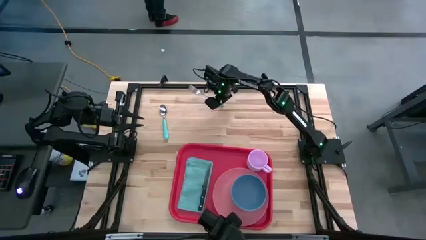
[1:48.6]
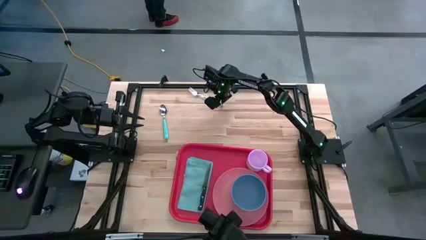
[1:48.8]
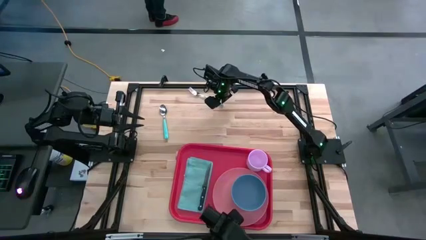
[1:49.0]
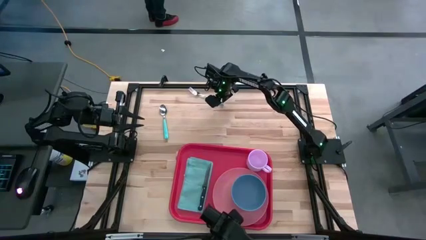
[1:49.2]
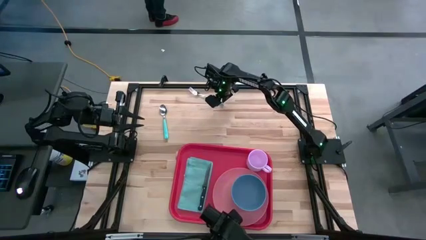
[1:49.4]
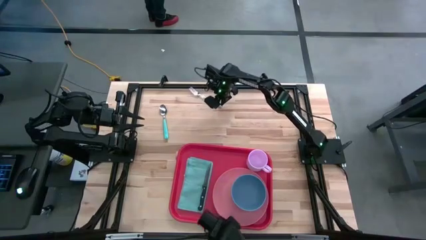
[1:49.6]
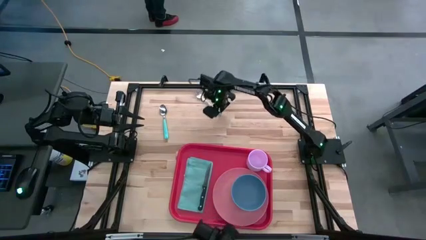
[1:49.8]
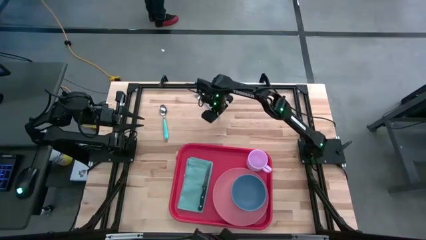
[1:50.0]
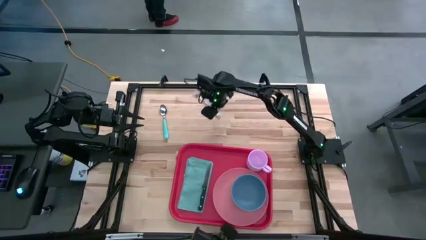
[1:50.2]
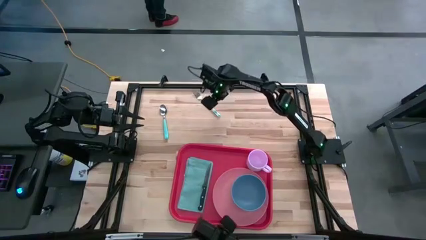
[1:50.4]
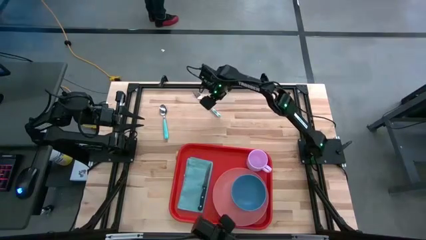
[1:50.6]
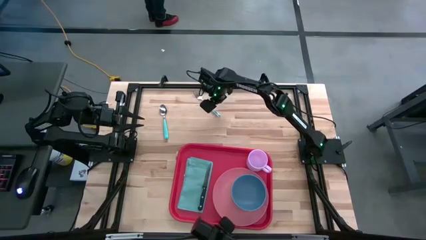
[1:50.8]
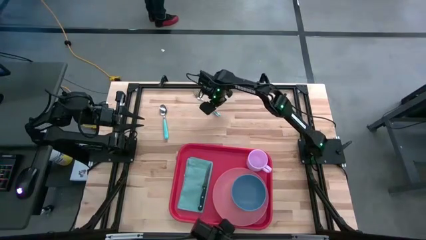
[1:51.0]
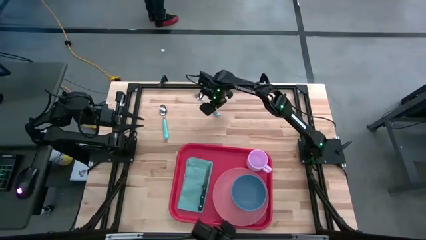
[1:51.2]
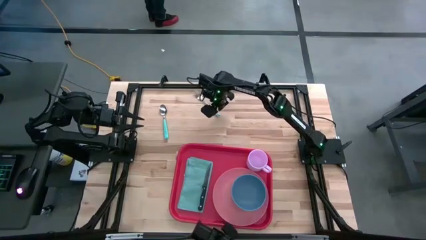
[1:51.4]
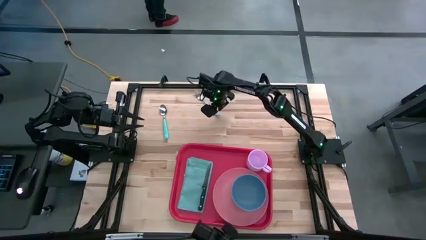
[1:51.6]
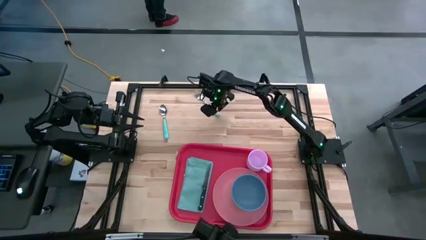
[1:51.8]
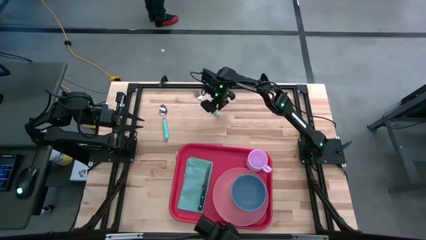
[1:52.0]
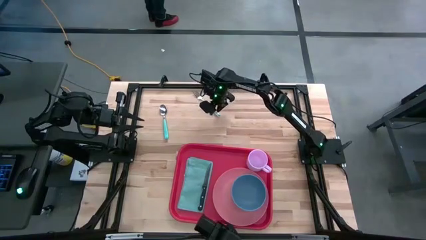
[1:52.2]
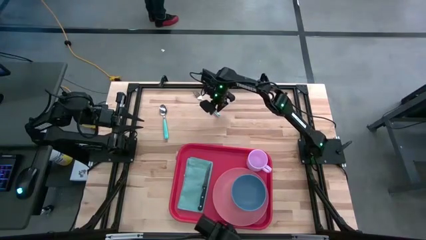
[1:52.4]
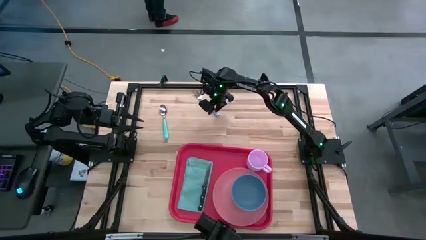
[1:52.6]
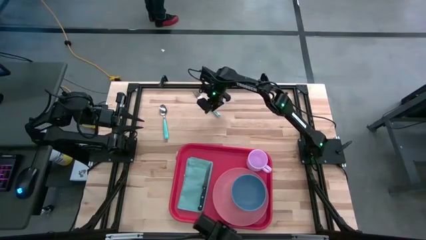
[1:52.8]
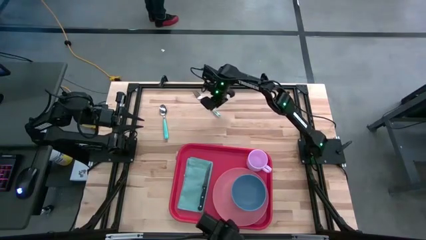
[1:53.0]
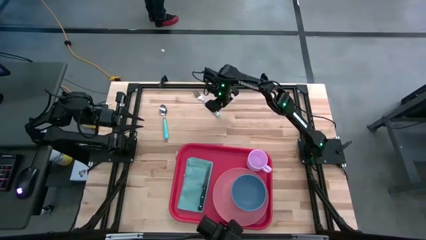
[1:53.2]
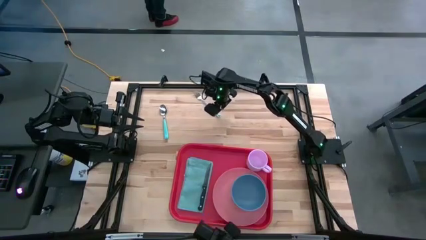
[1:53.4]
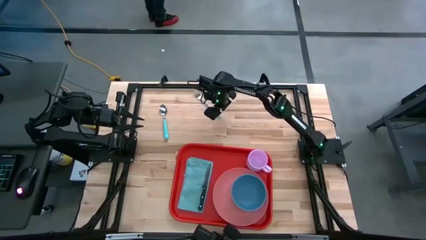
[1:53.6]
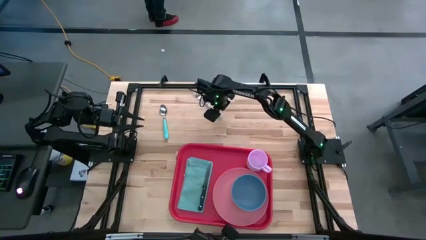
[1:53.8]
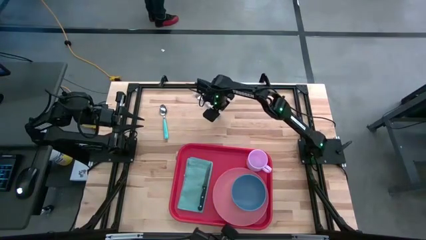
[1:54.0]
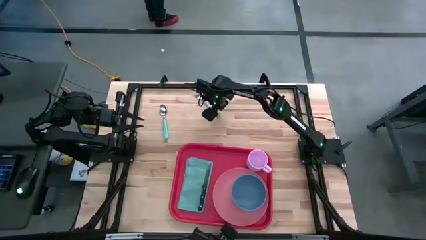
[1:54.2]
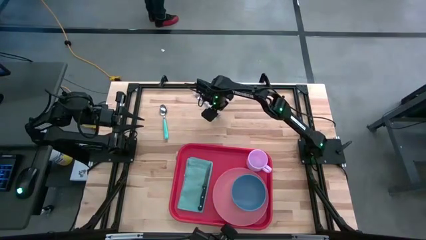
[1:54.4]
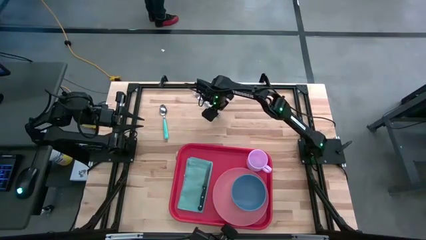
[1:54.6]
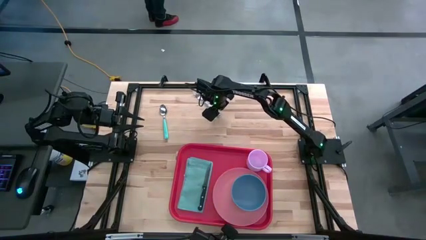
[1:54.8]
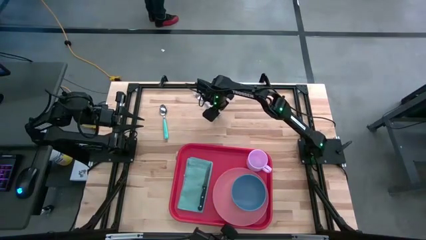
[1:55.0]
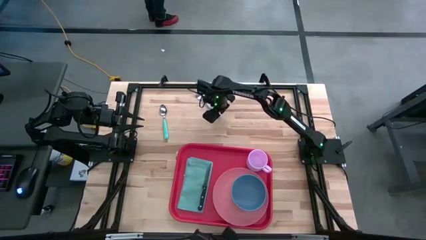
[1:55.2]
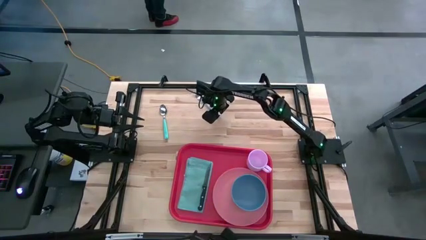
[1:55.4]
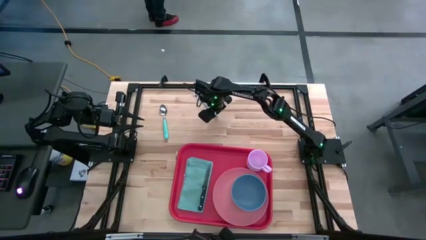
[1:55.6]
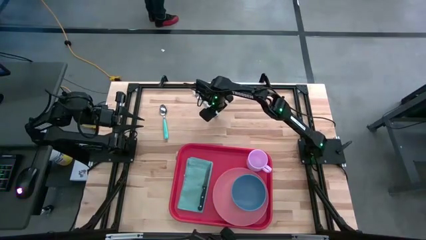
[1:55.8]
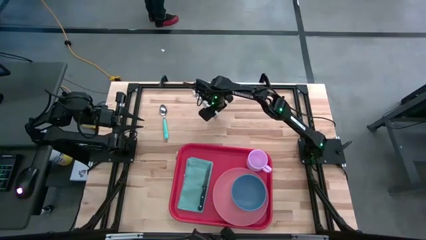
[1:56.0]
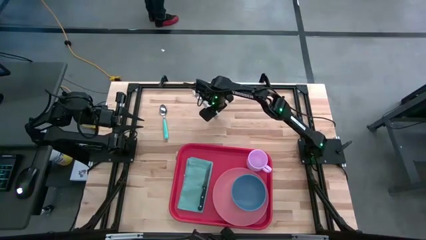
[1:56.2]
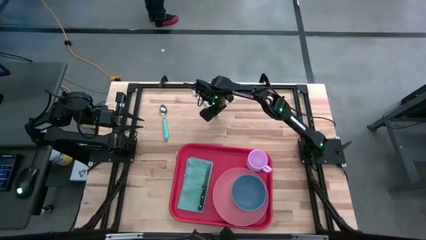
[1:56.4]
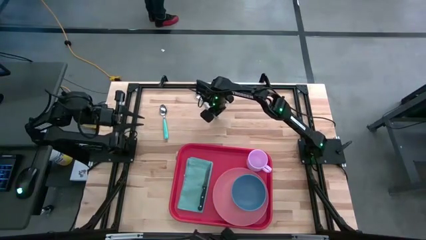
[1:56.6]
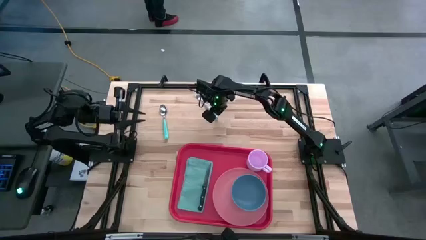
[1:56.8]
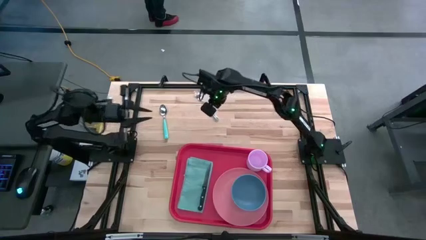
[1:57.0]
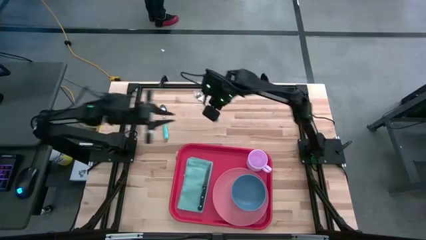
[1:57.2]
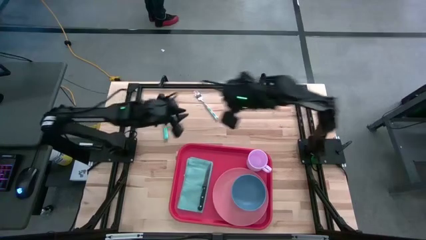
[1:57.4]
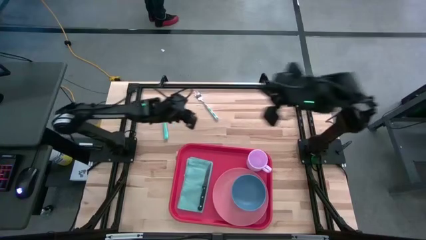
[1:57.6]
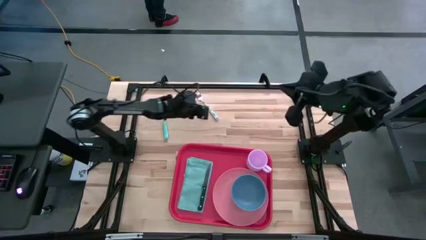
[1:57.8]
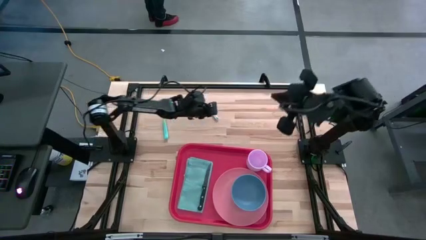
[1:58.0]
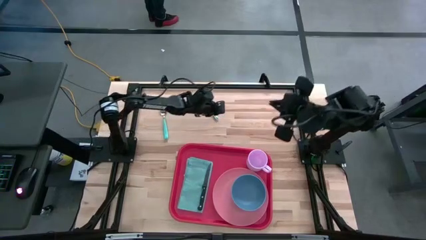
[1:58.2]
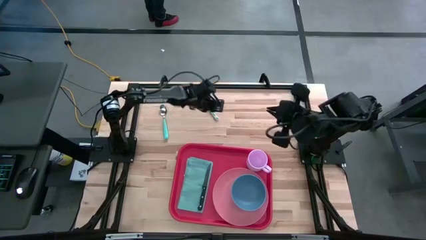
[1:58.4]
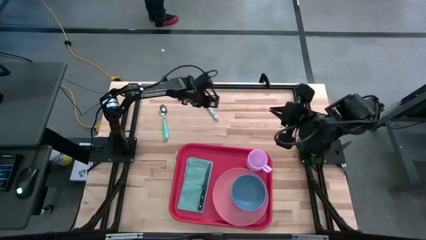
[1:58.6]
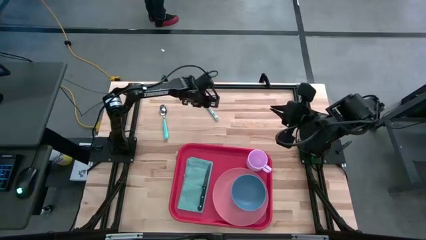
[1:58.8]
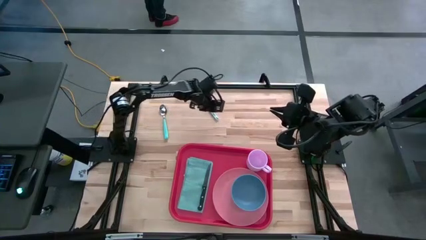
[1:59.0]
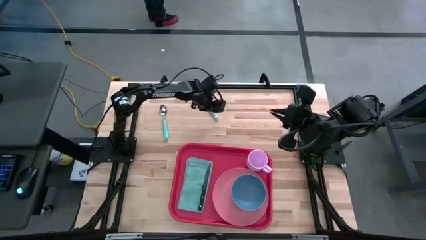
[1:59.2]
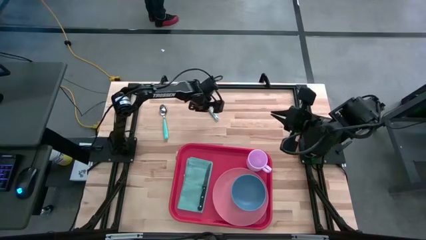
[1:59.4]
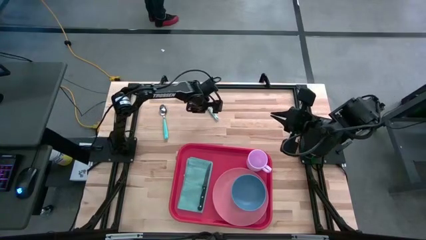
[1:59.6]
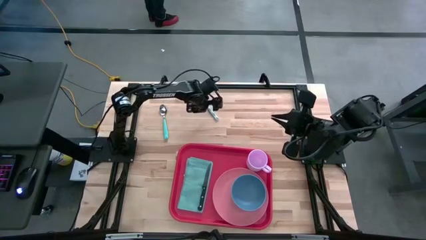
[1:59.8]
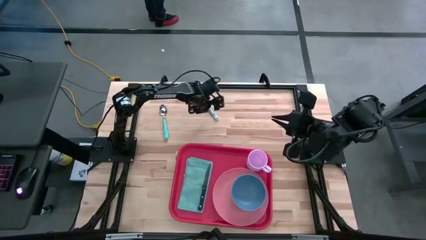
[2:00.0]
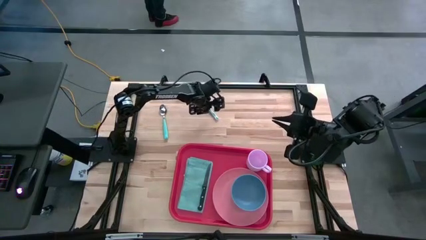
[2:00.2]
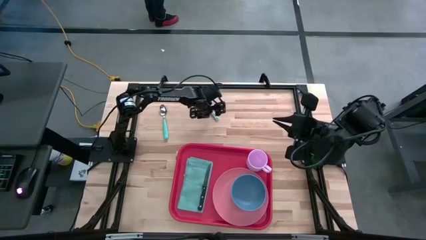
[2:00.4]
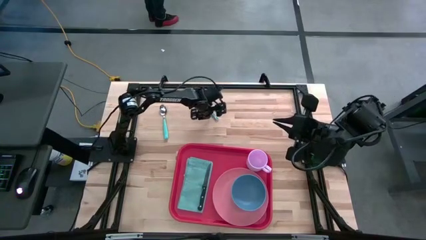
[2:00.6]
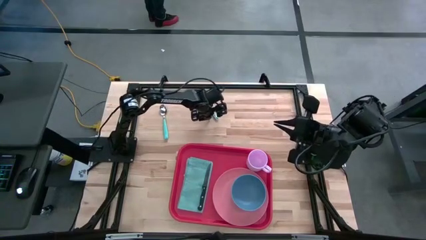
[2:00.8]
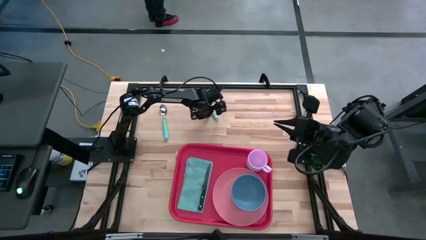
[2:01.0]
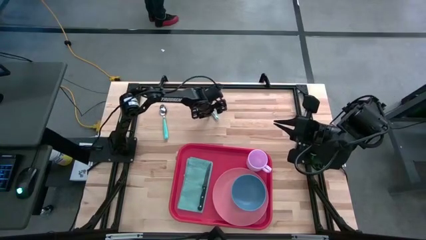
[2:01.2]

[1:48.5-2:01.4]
Task: Set up tray
Put the blue fork on the blue table napkin to the left of the black table knife

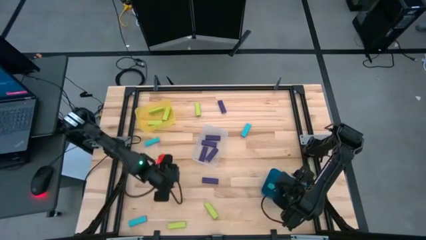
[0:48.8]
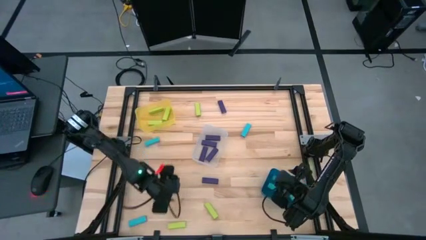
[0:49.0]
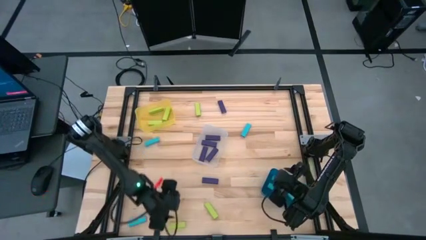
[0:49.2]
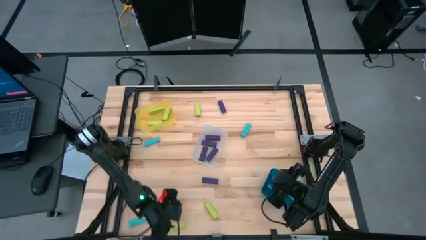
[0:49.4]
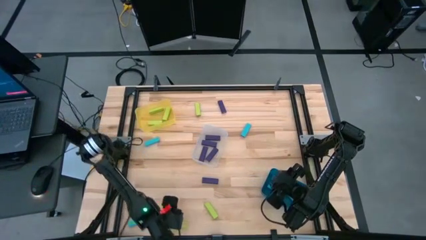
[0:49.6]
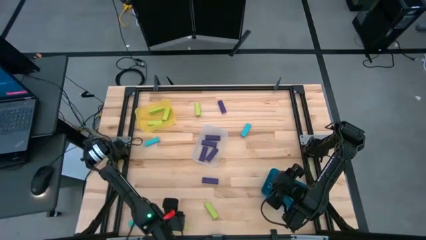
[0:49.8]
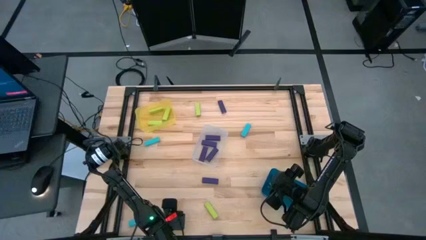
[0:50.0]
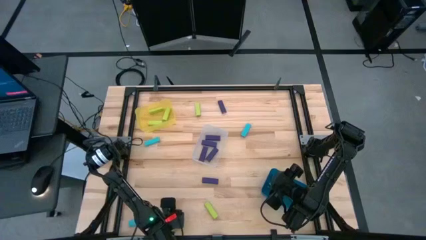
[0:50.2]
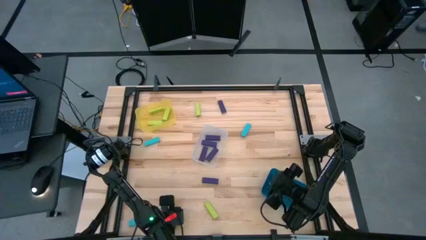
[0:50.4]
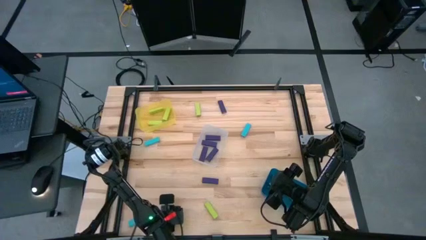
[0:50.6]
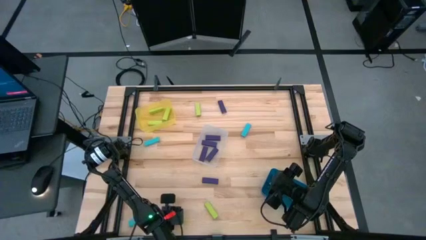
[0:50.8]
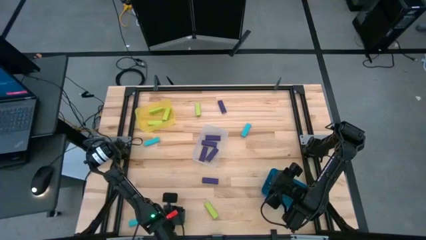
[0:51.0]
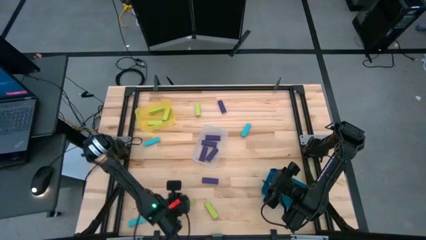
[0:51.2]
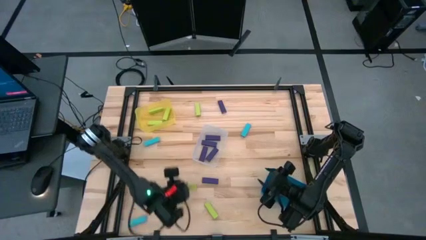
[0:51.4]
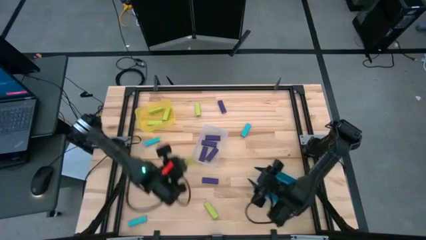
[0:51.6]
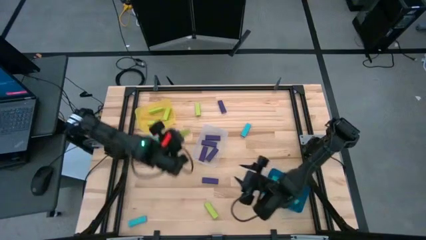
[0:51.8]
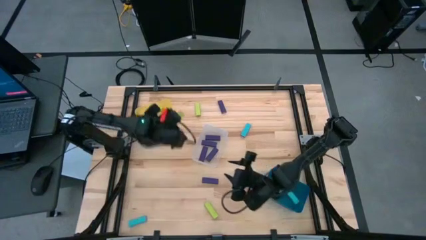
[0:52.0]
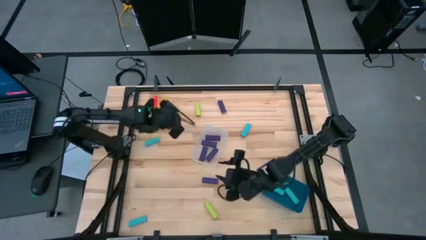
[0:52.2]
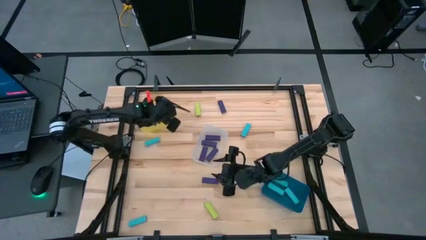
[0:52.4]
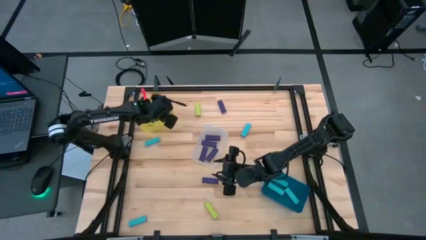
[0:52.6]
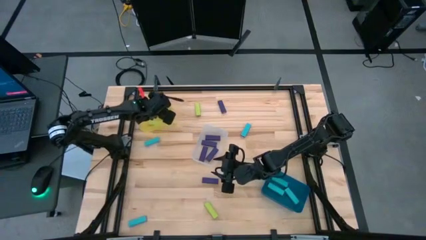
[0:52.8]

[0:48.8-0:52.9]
Task: Sort blocks
Put the left green block into the yellow bin
